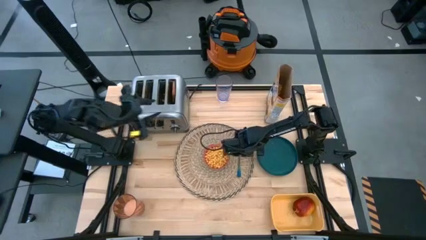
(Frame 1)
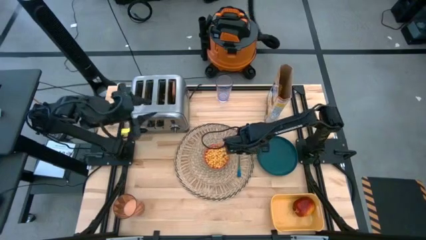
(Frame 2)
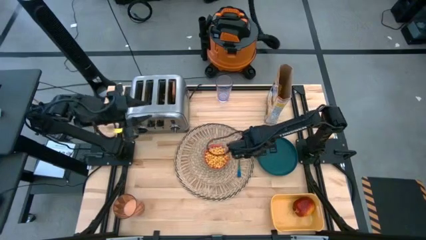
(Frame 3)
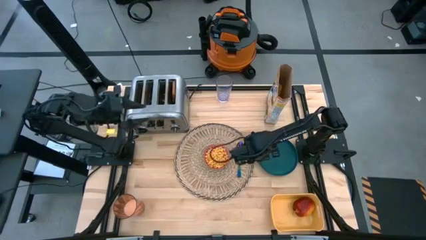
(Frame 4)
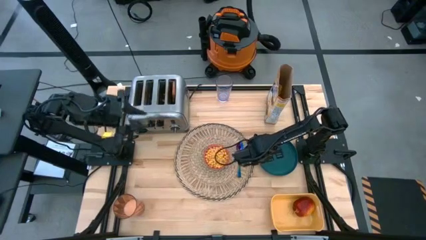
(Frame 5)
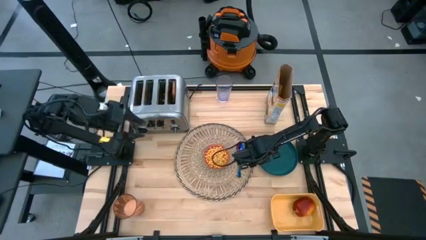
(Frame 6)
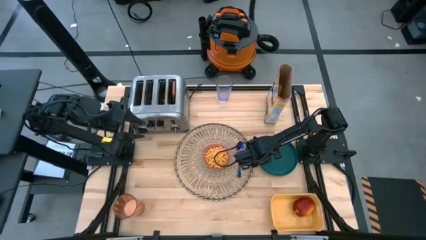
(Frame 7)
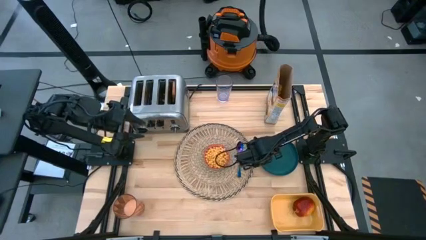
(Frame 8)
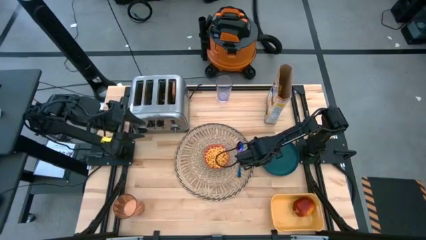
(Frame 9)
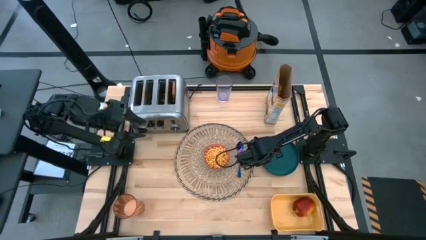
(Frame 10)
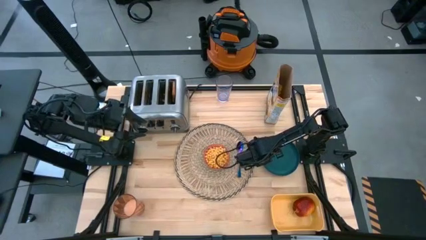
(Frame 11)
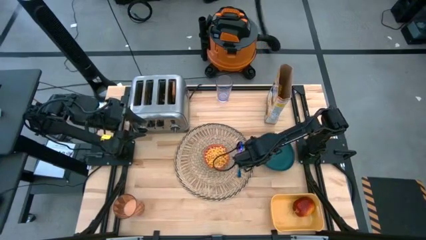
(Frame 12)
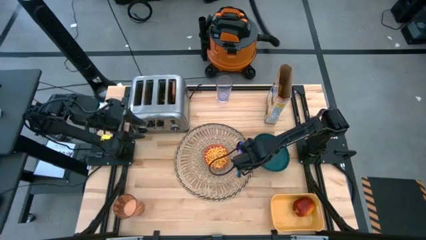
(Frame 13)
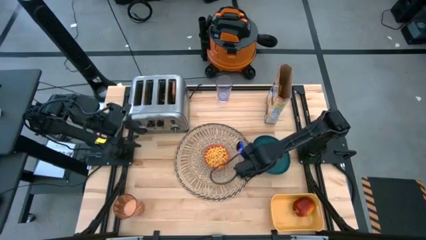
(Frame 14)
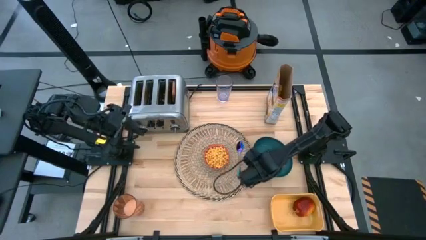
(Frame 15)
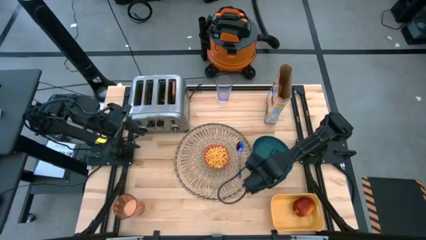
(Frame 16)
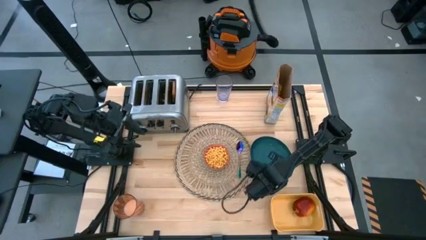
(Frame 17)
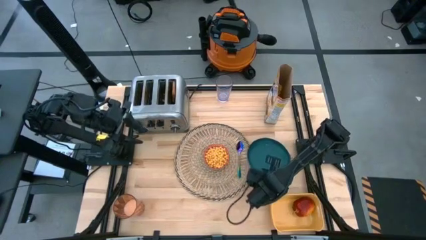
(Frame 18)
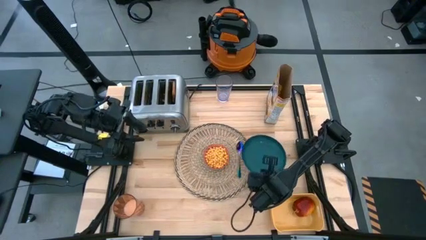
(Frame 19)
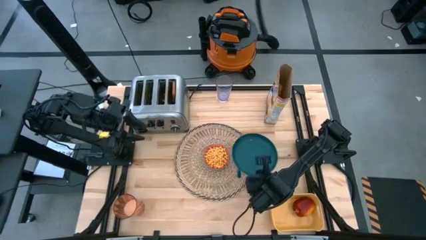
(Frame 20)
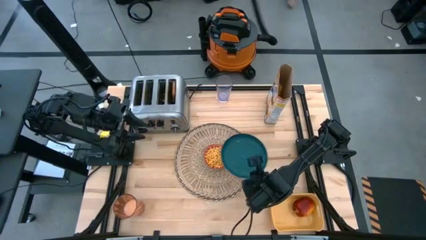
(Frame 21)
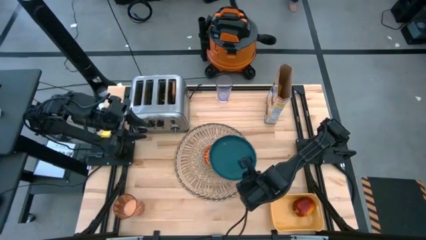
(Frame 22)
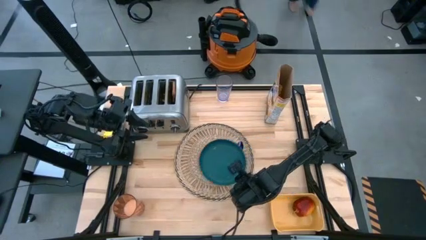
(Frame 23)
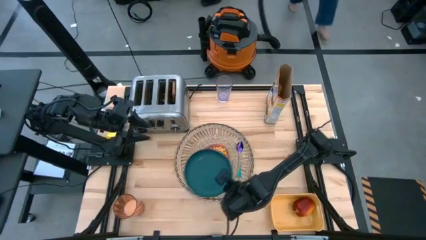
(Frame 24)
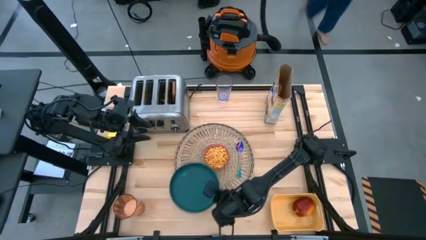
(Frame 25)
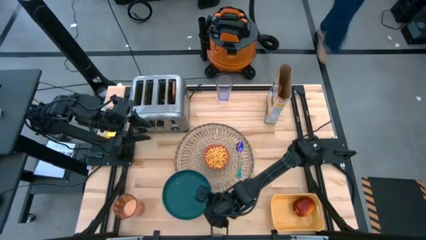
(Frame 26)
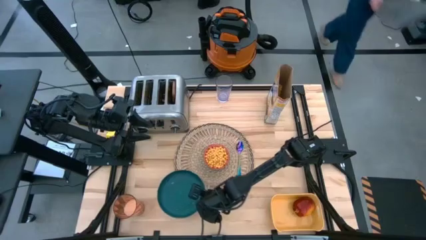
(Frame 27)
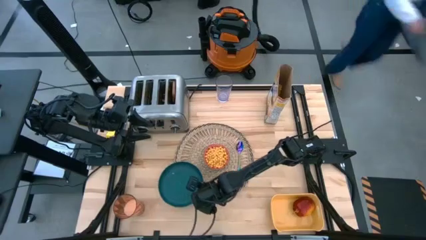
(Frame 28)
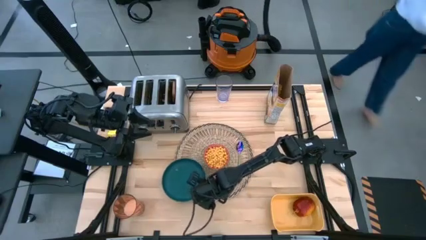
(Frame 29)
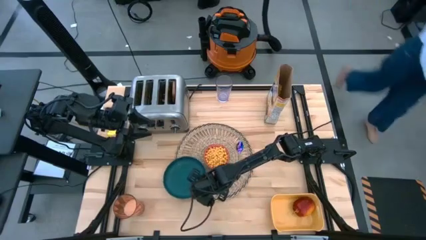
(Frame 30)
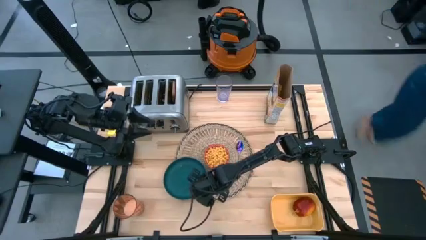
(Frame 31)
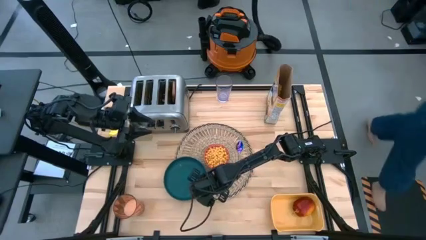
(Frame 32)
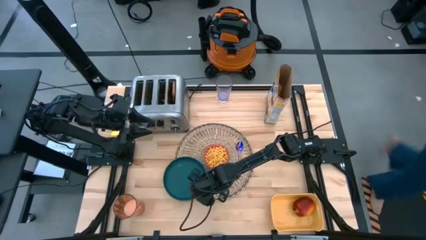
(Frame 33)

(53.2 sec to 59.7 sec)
Task: Arrange a breakfast setting
Put the blue plate to the left of the red bowl

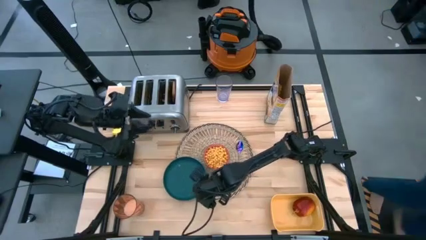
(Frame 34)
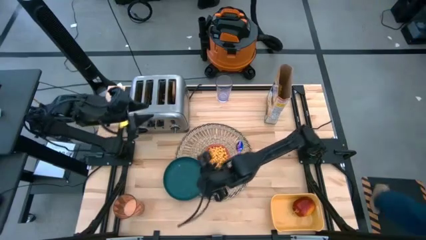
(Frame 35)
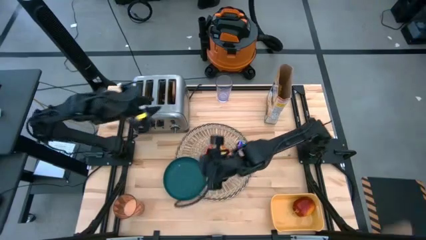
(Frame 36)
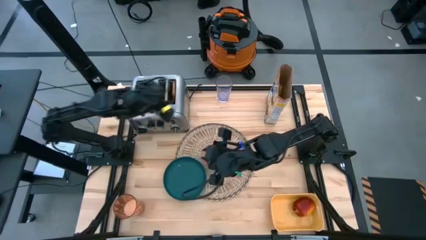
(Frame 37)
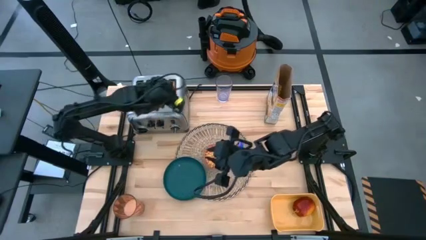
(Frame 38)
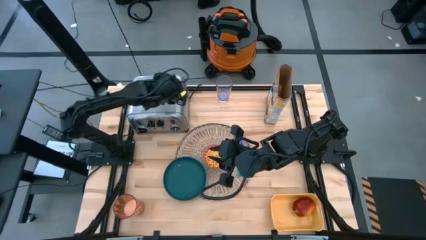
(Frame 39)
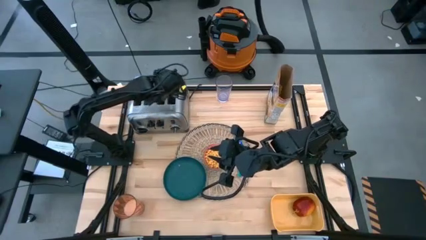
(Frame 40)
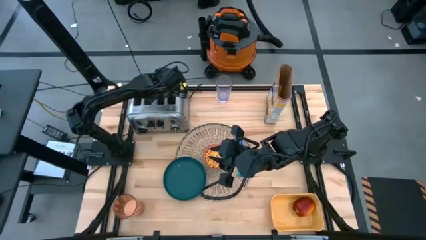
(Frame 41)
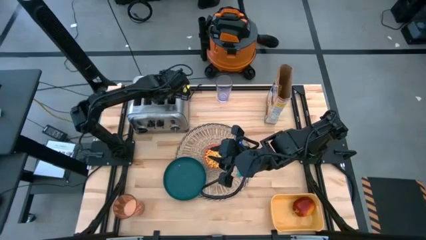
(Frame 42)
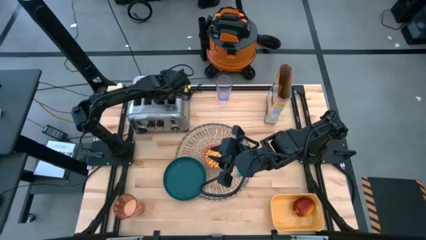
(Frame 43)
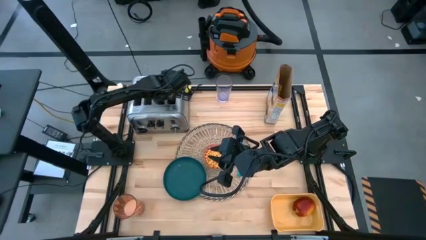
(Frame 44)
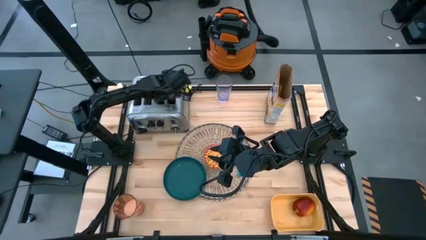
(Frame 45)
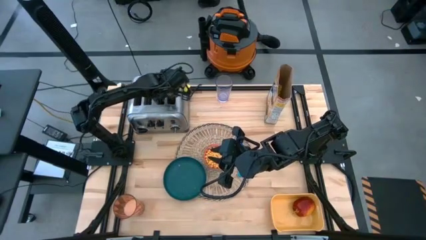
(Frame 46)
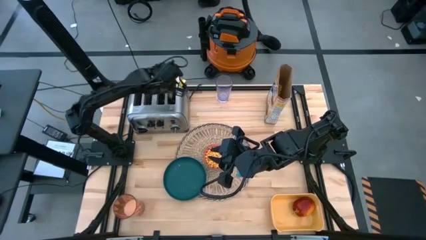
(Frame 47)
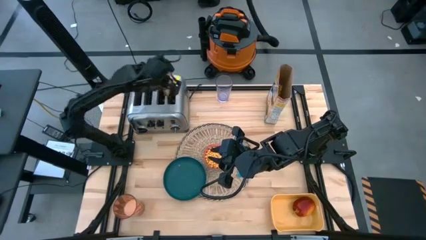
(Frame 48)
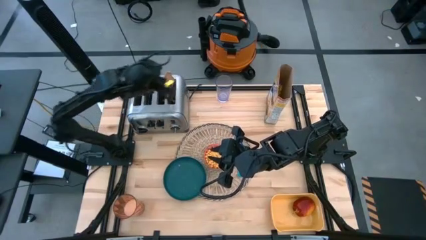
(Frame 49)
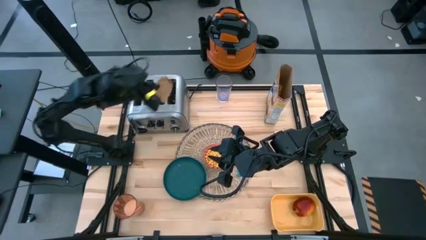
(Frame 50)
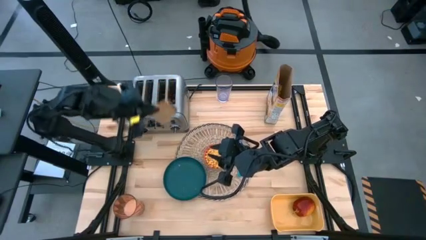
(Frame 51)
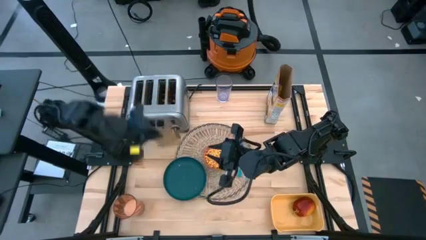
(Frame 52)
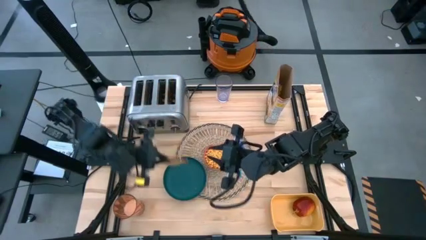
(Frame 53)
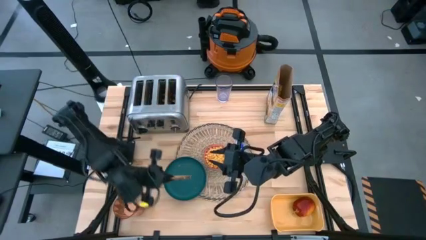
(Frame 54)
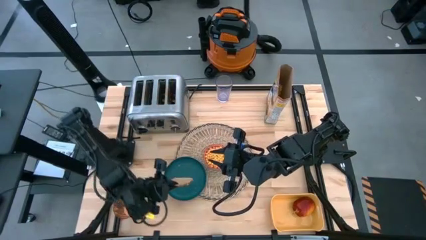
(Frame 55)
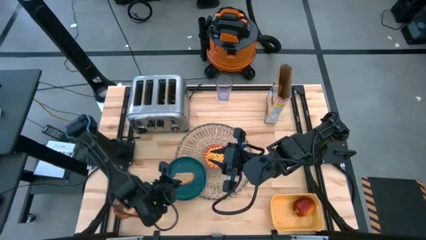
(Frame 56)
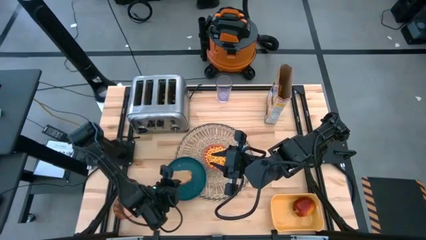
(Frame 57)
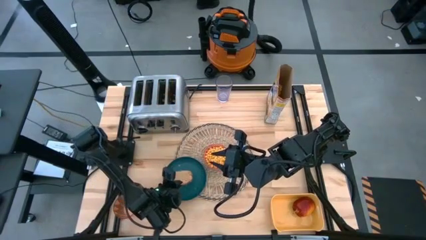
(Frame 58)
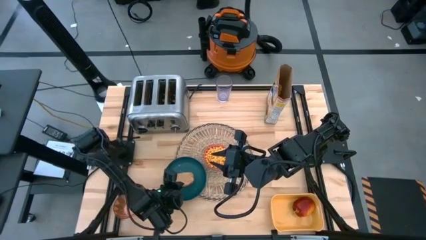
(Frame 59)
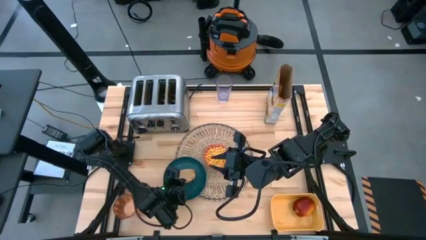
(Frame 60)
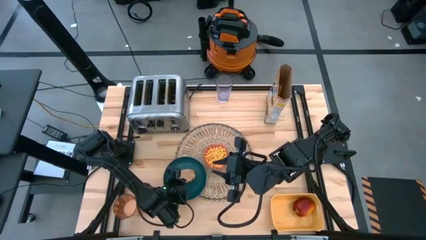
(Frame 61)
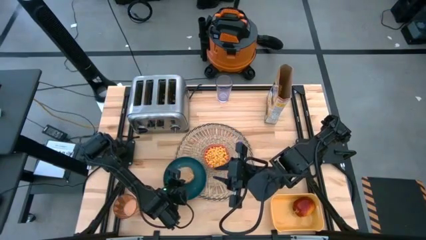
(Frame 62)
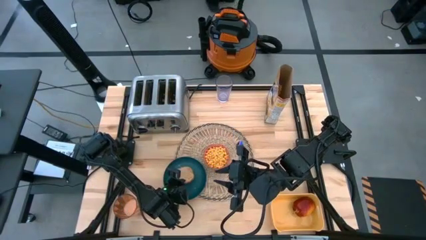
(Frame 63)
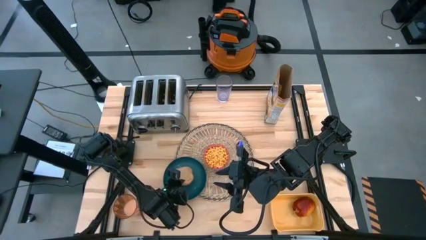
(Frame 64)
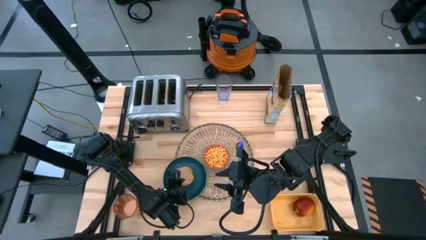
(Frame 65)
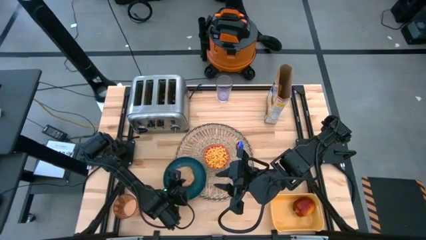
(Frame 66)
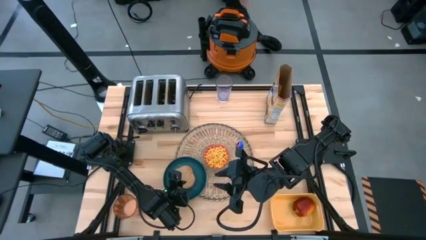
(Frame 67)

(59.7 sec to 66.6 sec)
Put the bread on the blue plate
